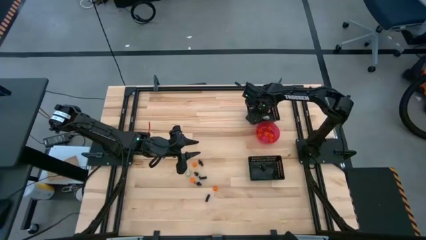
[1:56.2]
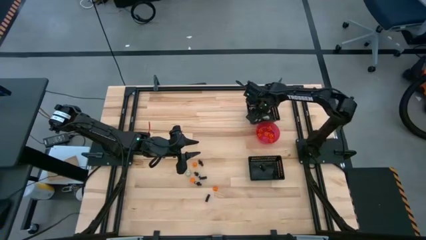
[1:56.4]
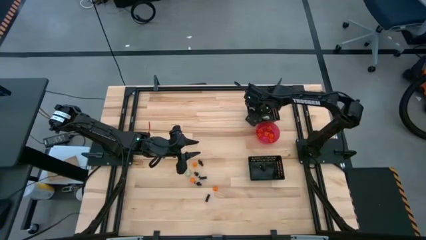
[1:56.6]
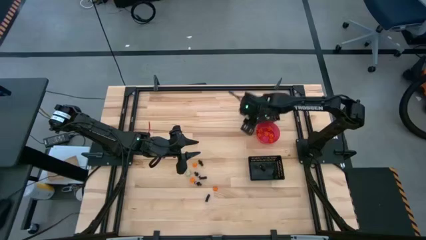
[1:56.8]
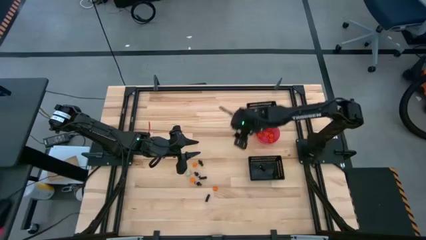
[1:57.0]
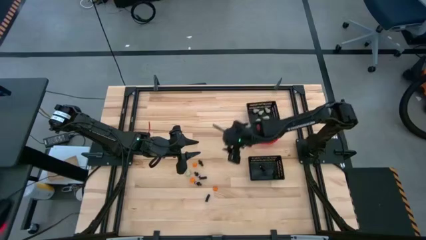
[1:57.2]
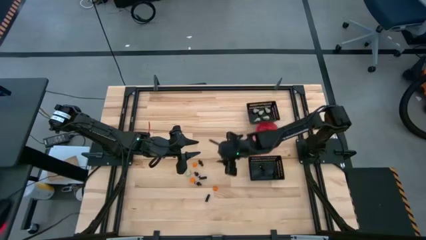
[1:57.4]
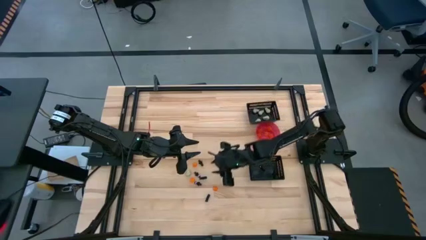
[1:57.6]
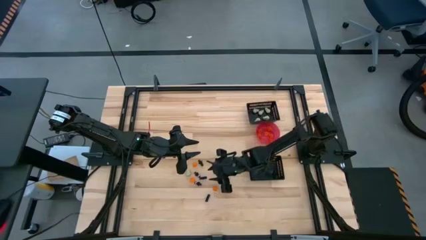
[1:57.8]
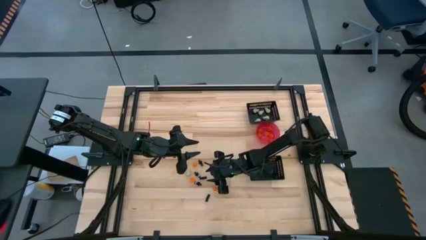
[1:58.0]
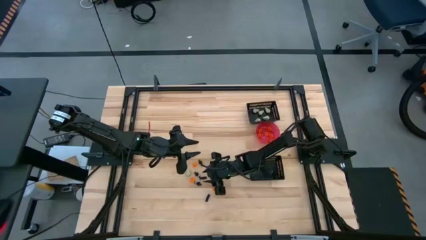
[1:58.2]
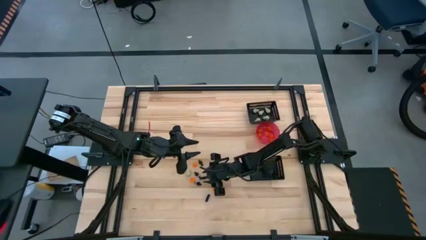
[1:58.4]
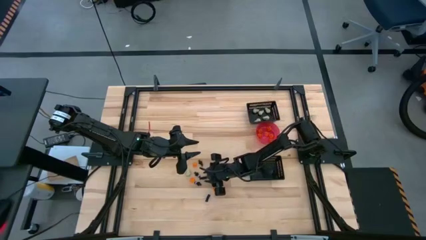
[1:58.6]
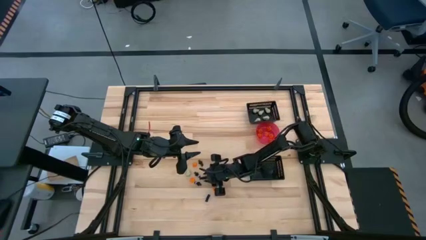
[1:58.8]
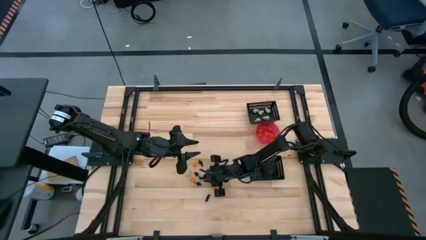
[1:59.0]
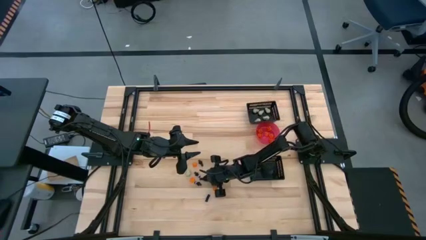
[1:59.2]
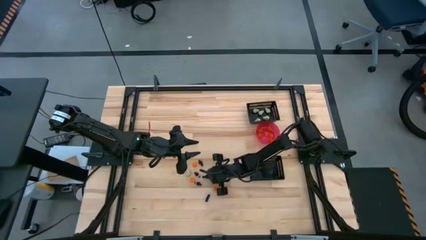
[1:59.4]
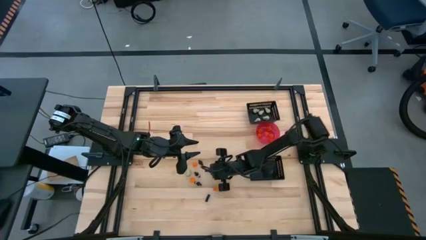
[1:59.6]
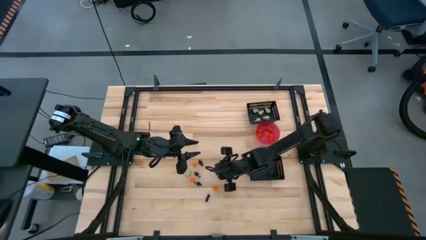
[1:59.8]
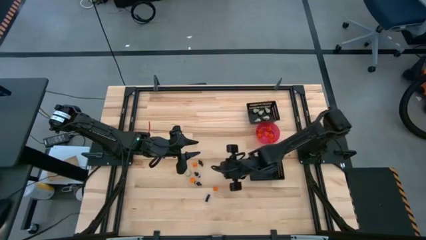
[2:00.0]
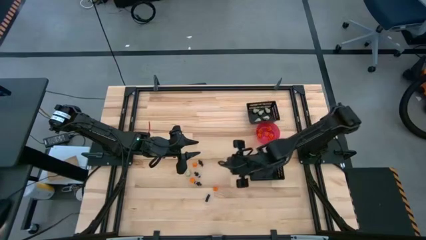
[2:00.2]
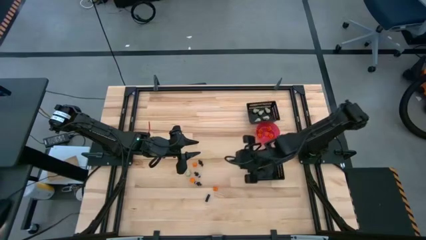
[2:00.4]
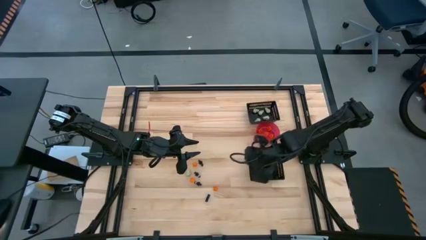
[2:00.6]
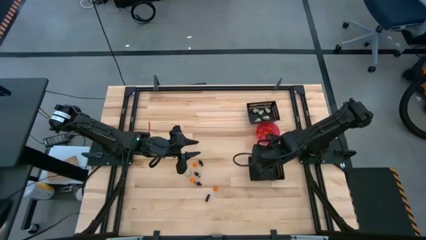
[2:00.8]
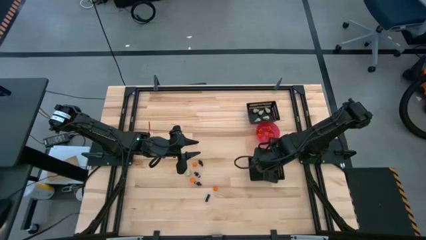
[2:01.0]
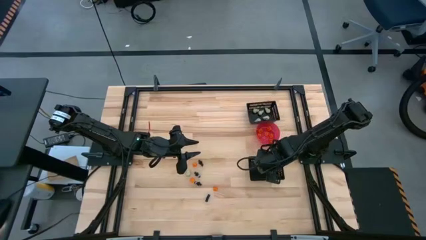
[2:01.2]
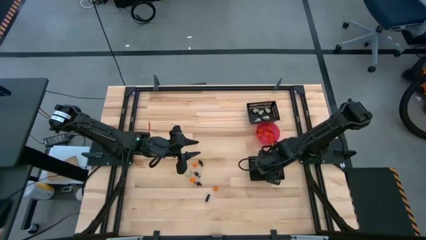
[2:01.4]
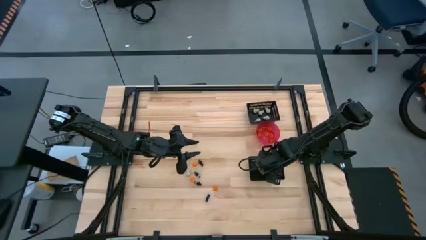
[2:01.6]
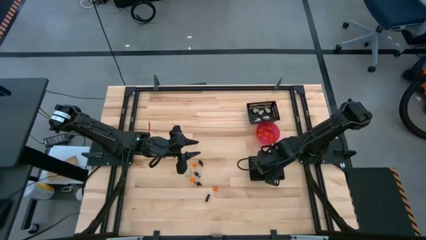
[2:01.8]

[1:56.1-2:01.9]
Task: Sort Halloween decoration
Put the black skeleton toy into the bottom black bin

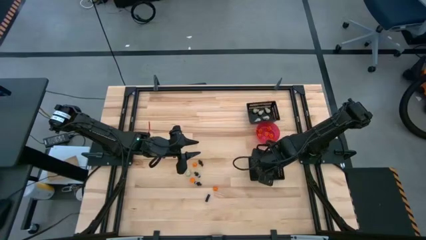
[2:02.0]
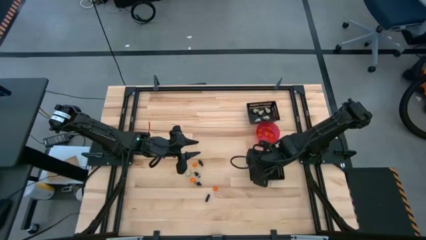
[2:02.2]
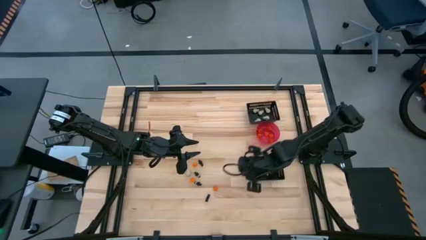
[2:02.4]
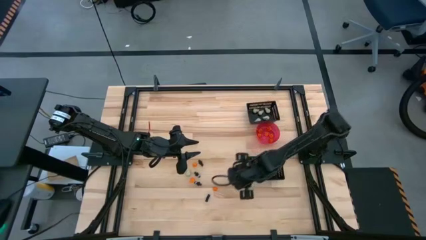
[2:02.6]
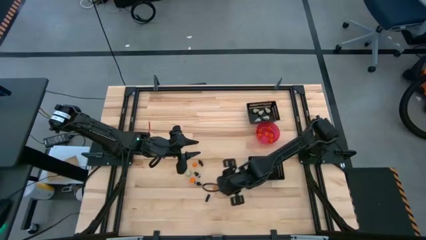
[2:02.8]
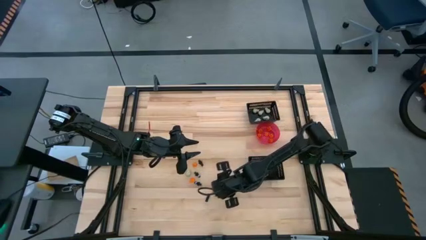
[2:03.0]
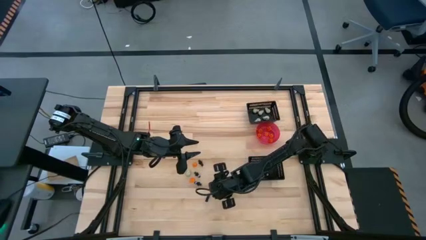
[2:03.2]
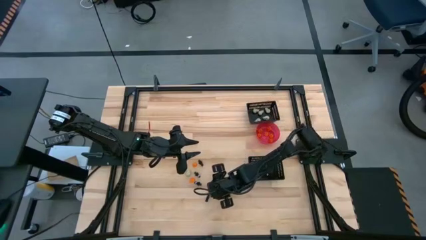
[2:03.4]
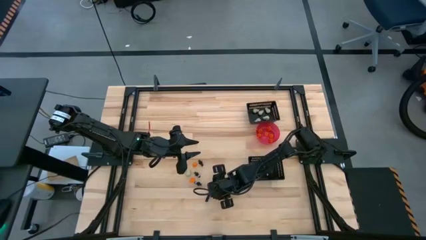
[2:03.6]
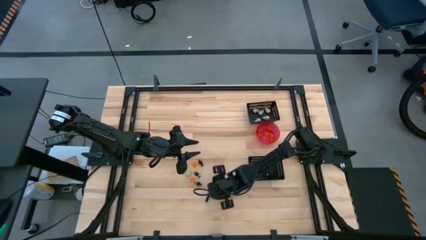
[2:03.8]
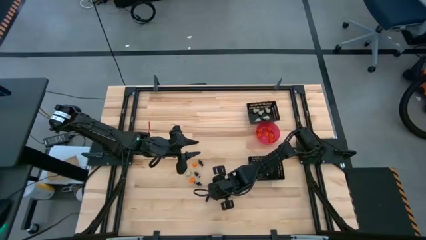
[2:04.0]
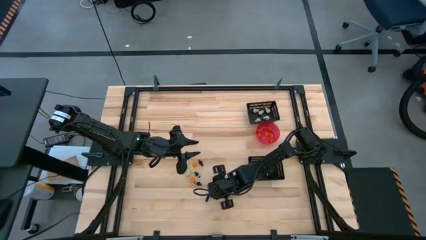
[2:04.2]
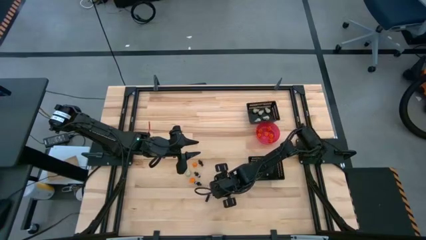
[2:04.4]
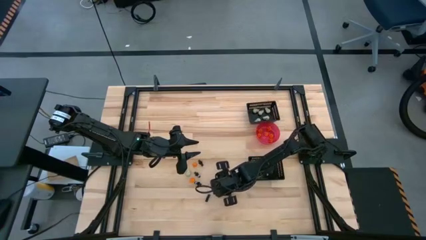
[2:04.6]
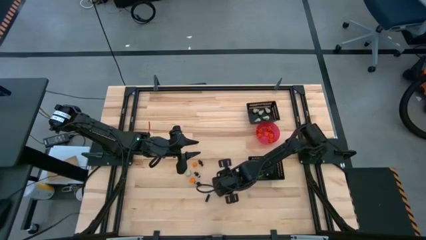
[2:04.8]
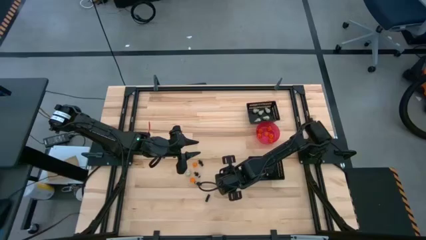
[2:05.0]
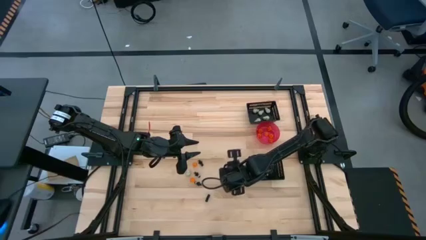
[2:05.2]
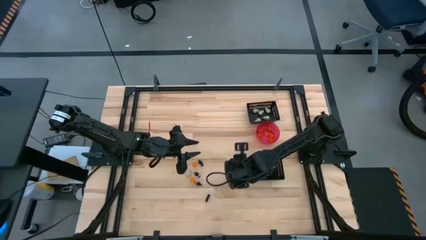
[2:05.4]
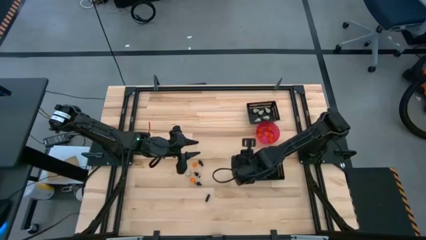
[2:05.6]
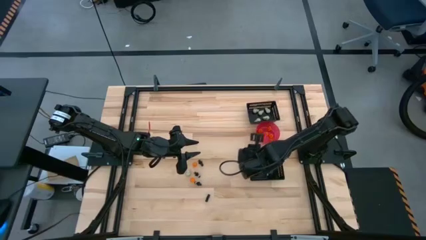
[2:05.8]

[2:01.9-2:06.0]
Put the orange pumpkin toy into the pink bowl

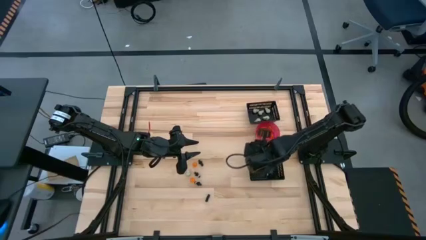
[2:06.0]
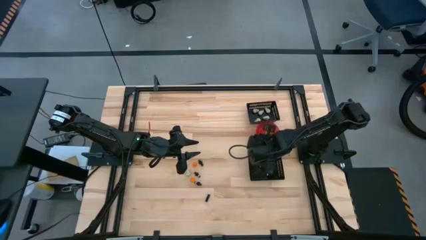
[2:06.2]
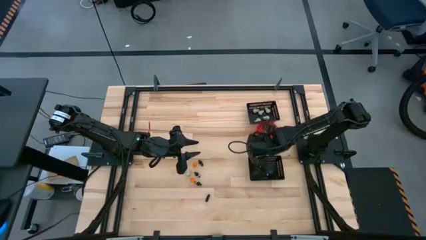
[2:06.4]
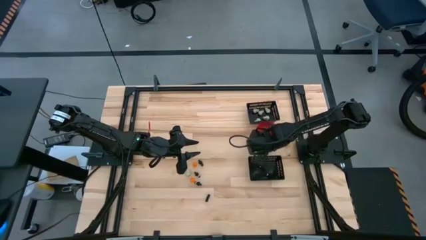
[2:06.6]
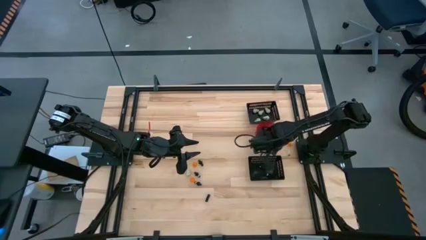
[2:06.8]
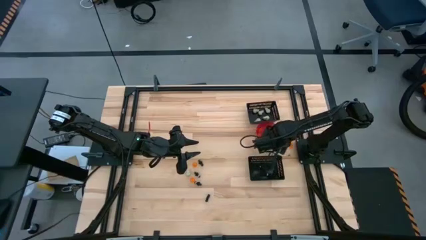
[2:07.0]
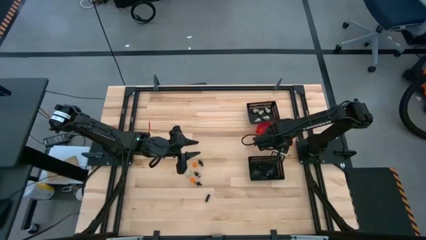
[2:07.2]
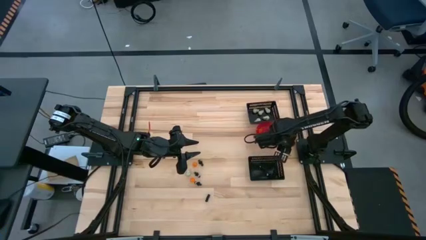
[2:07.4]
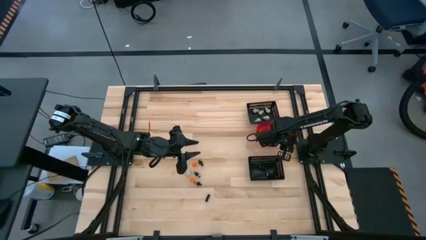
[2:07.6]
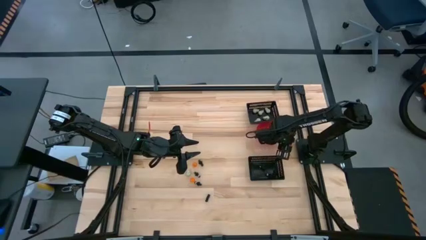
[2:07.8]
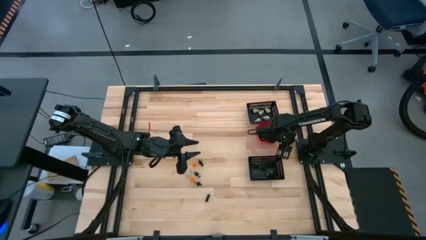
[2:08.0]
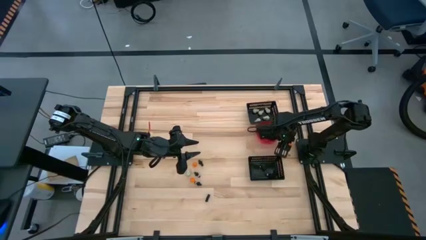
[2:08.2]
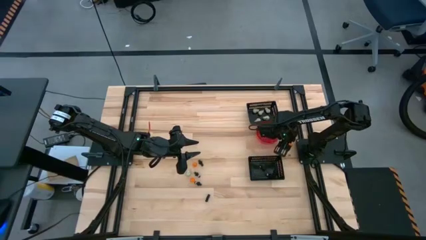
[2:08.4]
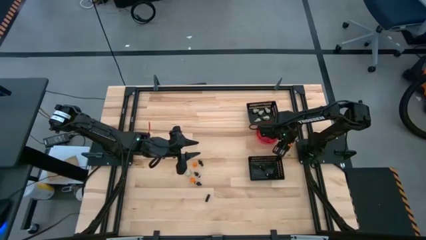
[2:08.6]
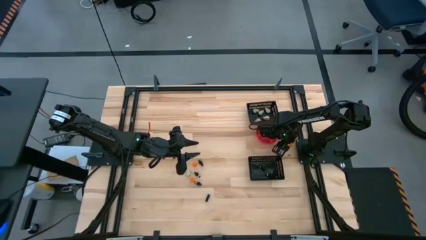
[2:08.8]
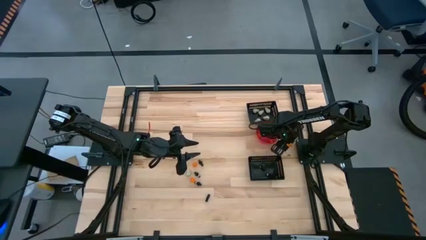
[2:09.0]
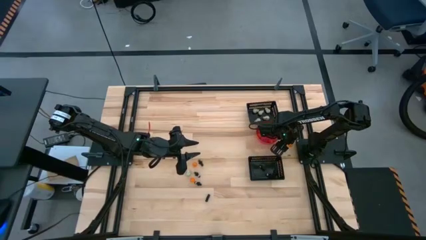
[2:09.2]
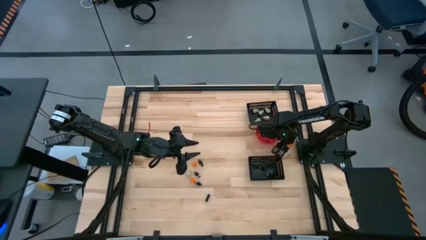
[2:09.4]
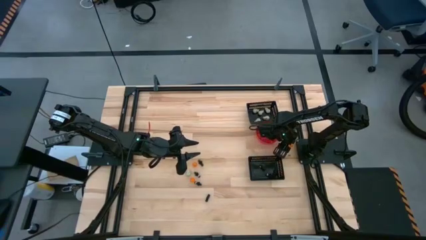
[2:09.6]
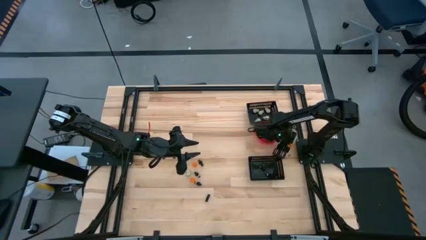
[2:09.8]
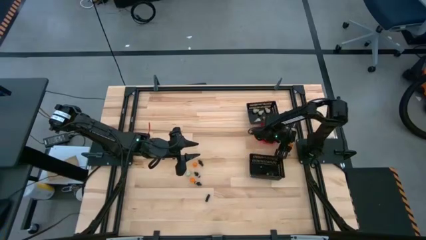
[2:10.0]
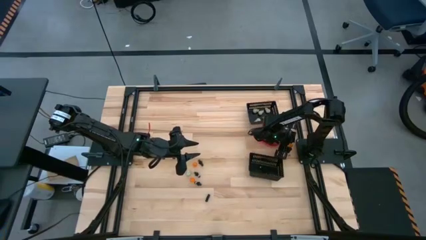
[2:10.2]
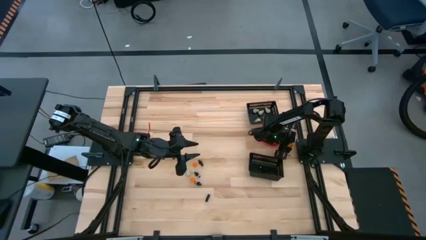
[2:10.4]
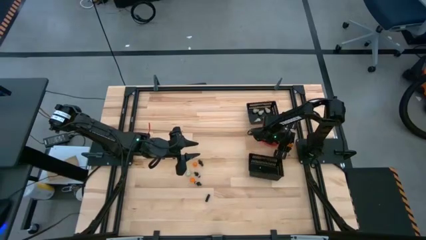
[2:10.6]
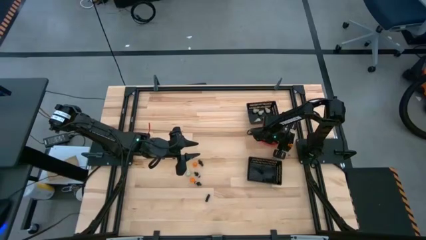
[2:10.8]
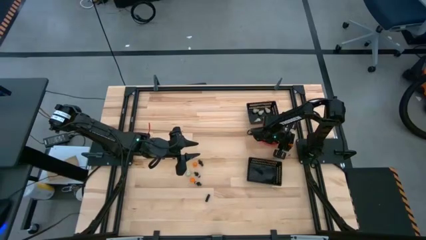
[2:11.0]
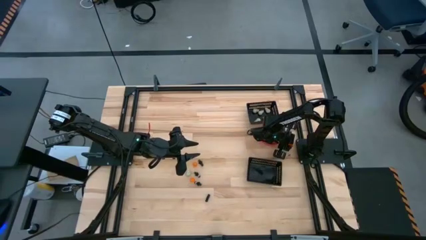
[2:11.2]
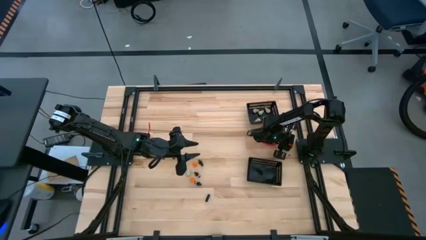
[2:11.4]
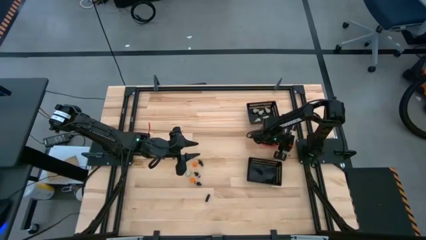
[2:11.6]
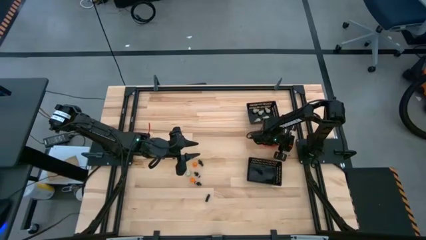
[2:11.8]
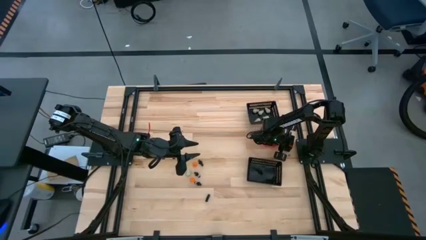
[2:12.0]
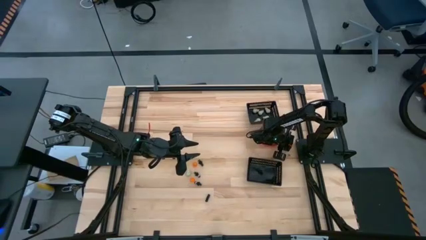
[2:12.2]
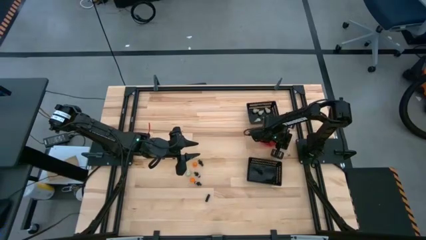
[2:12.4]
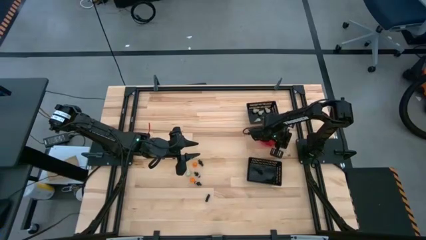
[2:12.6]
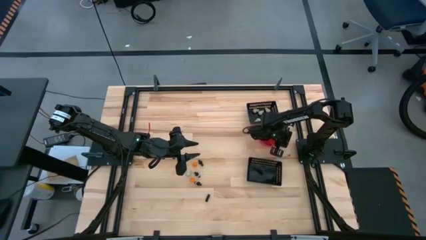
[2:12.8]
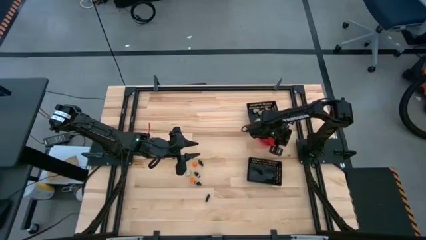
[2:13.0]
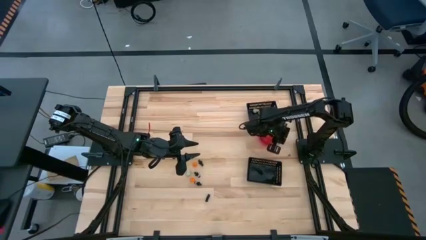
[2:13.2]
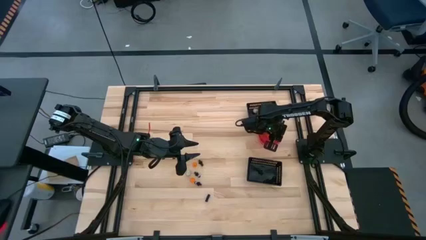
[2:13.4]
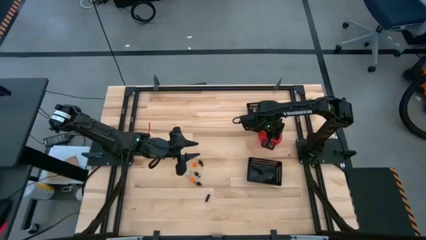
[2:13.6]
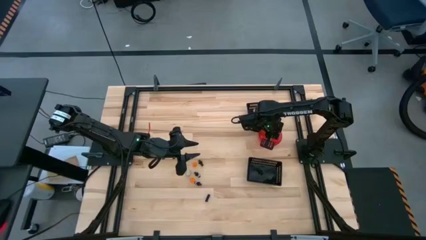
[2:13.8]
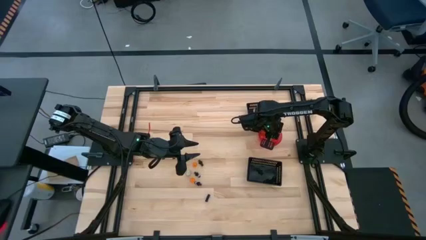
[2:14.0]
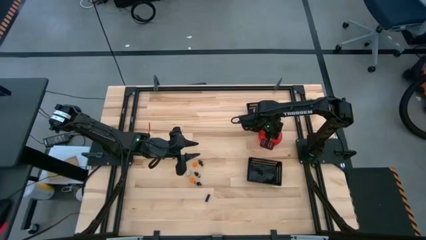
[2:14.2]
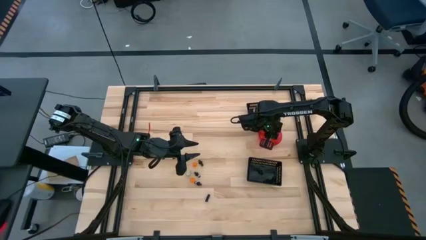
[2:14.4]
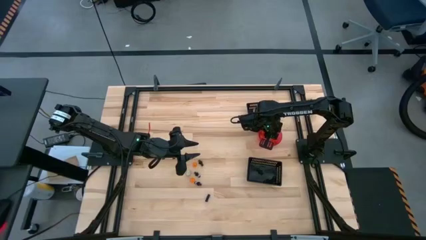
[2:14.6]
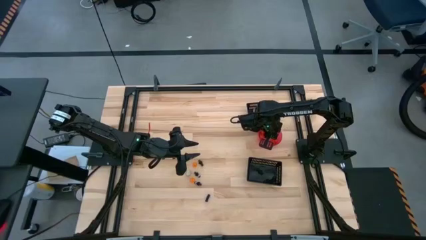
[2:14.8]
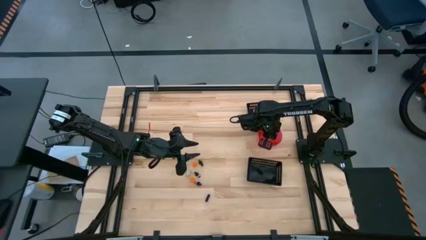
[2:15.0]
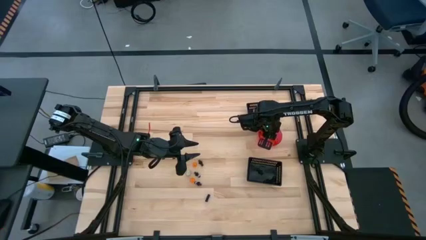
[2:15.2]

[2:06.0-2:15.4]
Put the orange pumpkin toy into the pink bowl
